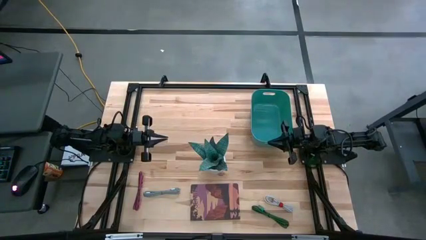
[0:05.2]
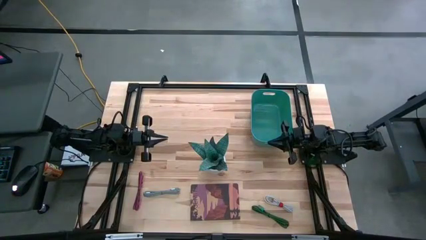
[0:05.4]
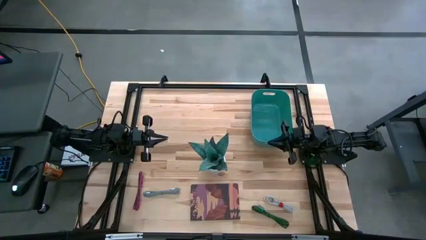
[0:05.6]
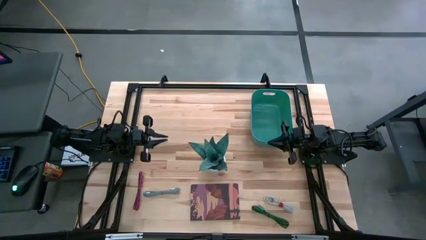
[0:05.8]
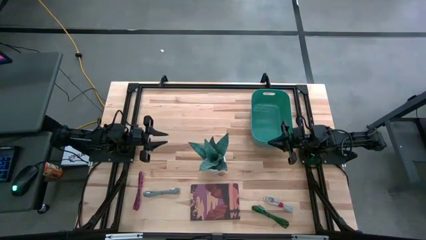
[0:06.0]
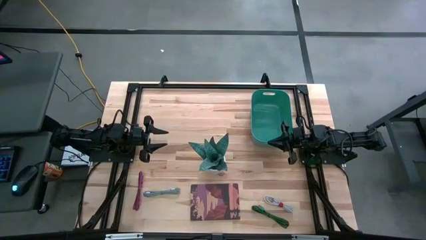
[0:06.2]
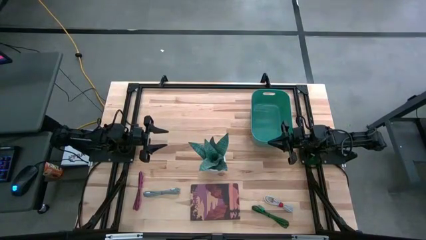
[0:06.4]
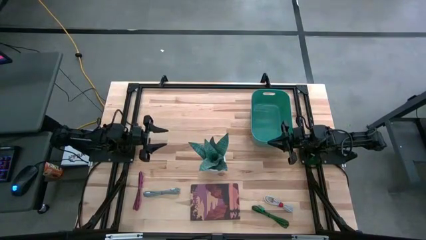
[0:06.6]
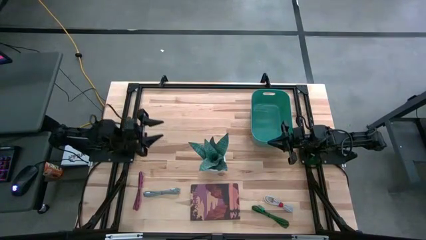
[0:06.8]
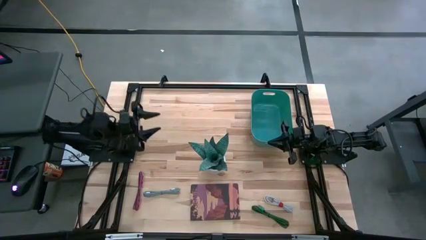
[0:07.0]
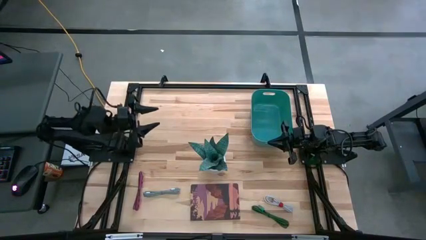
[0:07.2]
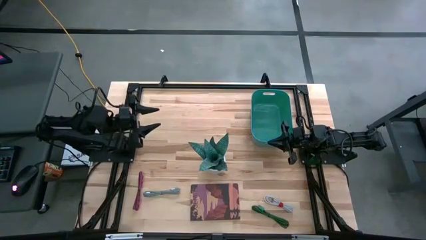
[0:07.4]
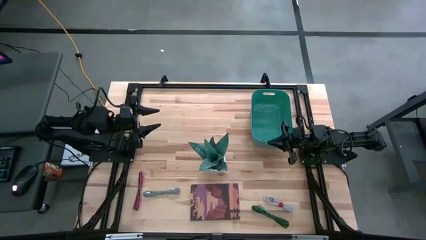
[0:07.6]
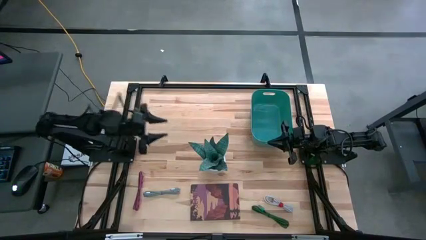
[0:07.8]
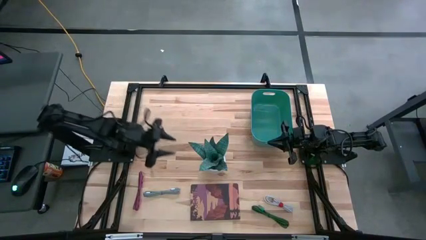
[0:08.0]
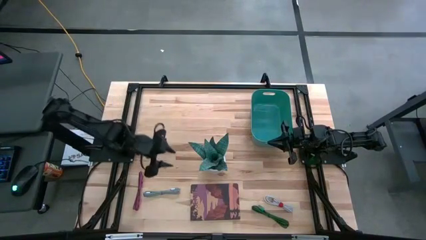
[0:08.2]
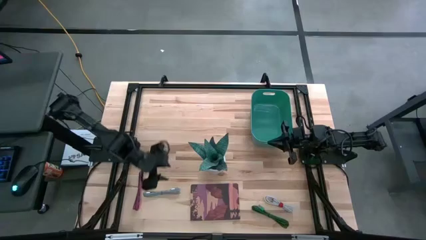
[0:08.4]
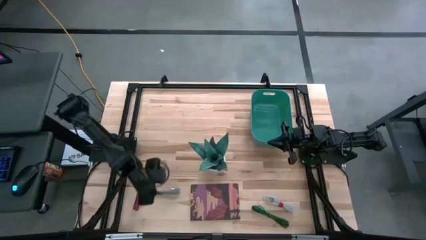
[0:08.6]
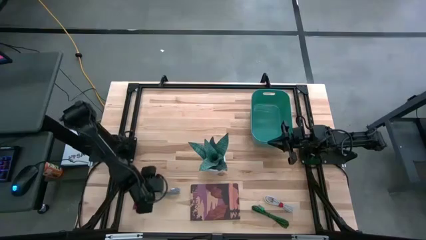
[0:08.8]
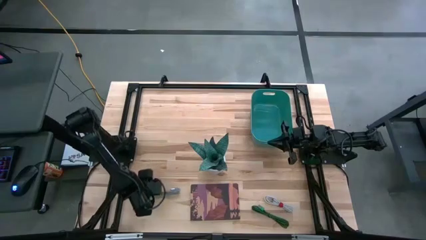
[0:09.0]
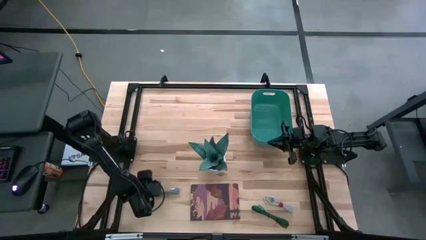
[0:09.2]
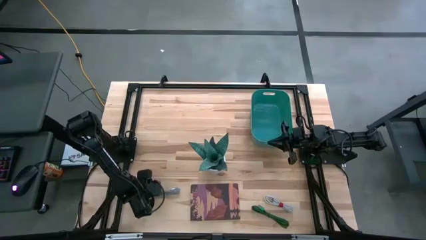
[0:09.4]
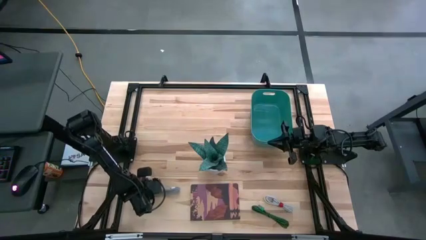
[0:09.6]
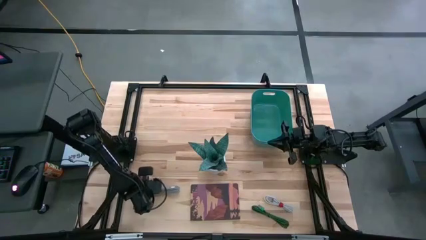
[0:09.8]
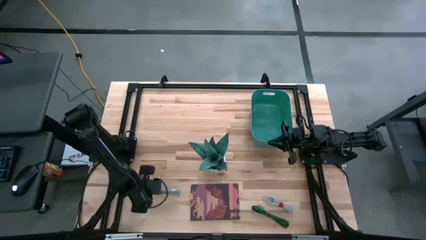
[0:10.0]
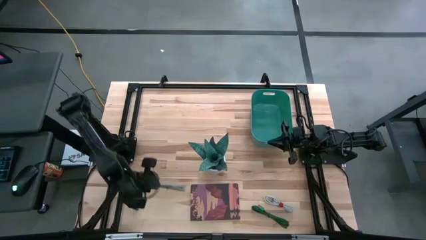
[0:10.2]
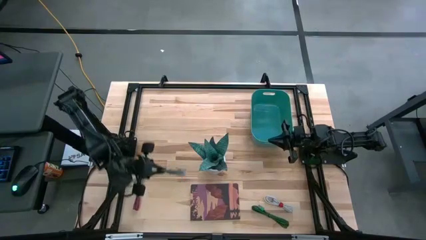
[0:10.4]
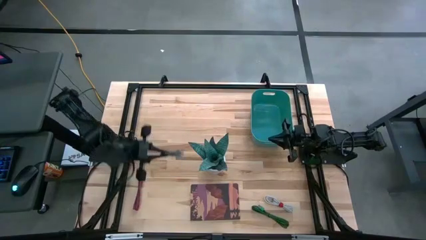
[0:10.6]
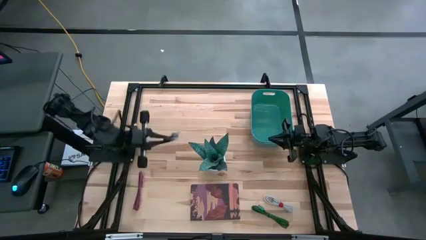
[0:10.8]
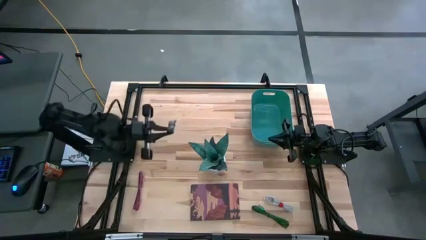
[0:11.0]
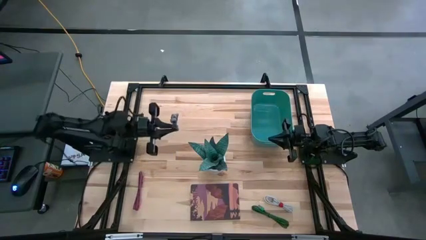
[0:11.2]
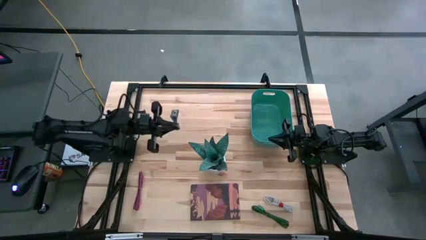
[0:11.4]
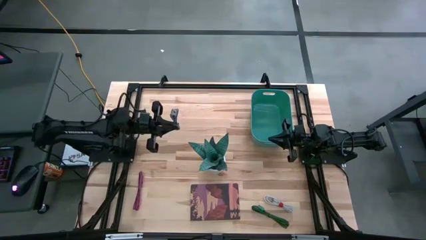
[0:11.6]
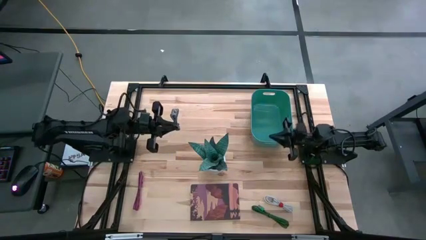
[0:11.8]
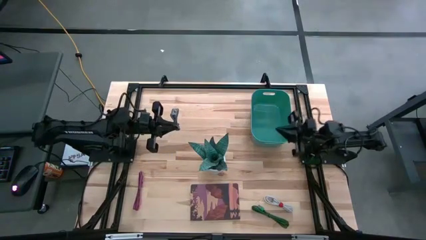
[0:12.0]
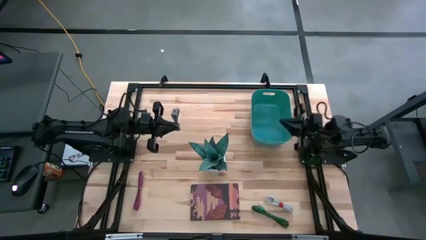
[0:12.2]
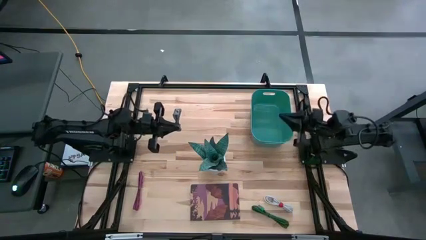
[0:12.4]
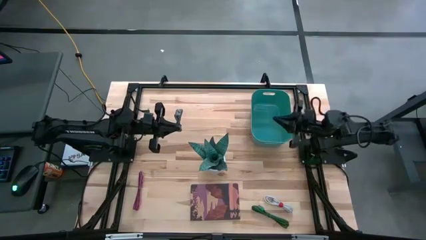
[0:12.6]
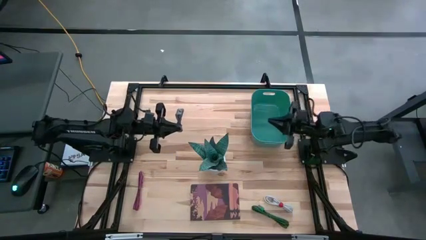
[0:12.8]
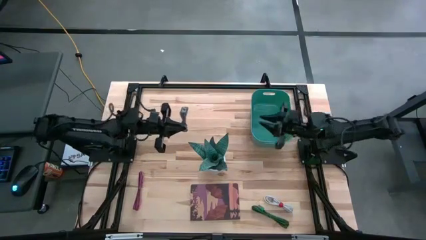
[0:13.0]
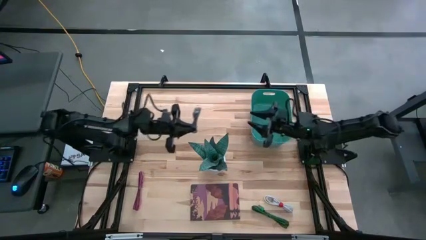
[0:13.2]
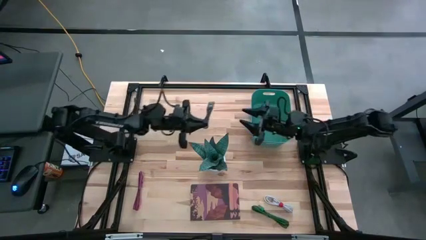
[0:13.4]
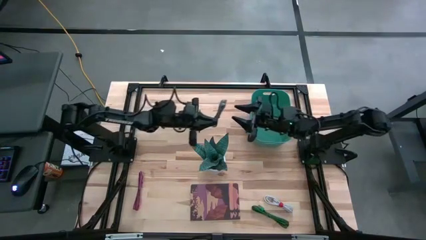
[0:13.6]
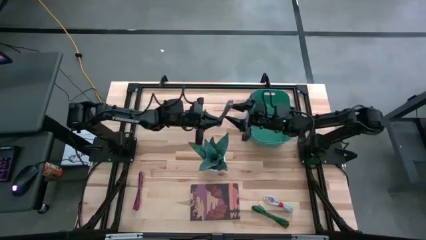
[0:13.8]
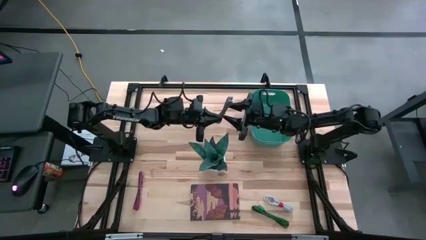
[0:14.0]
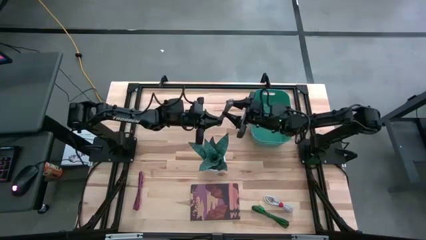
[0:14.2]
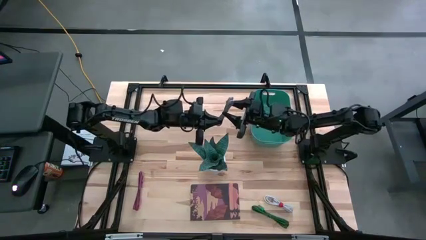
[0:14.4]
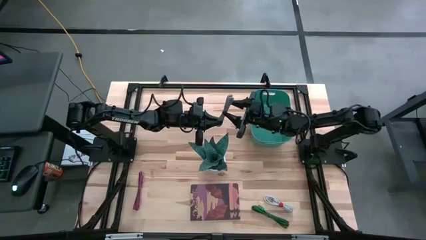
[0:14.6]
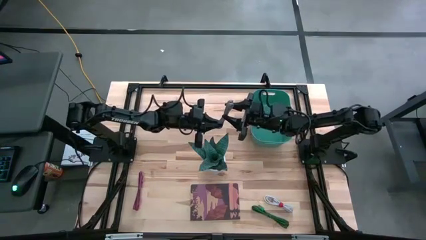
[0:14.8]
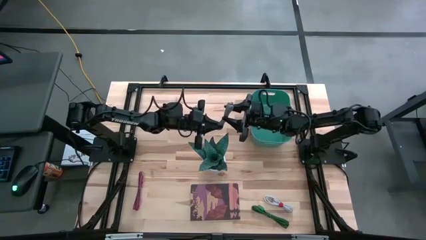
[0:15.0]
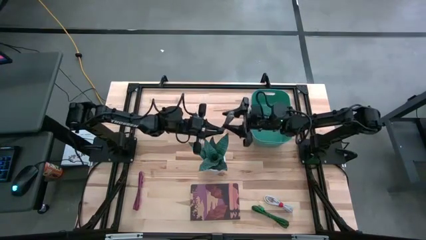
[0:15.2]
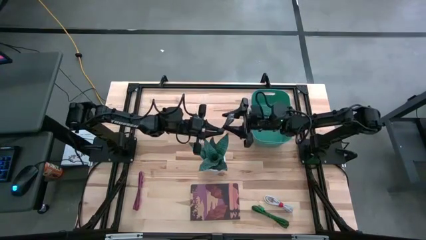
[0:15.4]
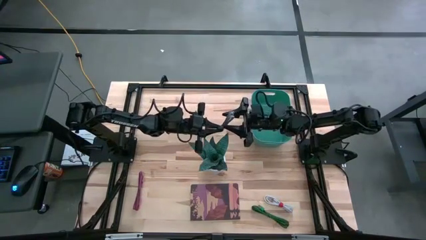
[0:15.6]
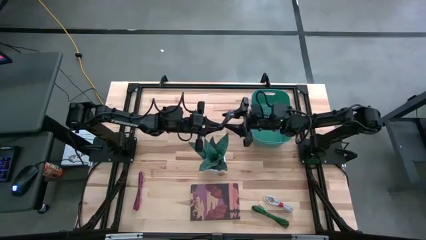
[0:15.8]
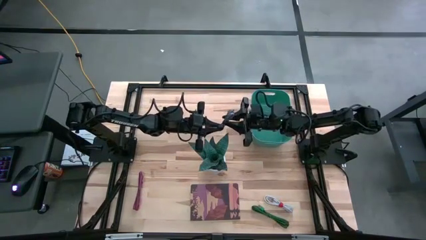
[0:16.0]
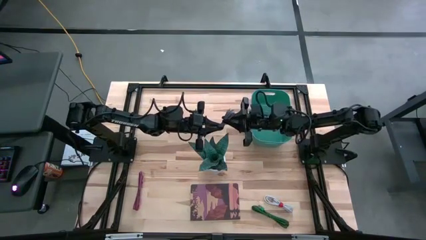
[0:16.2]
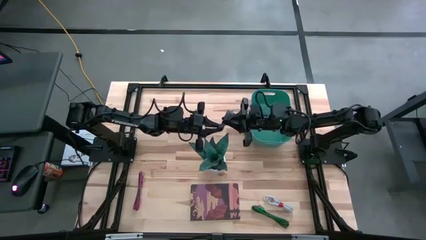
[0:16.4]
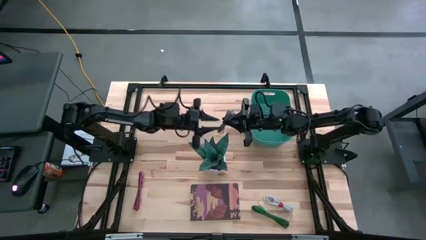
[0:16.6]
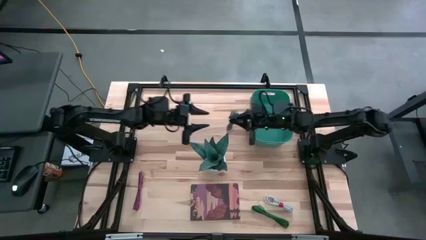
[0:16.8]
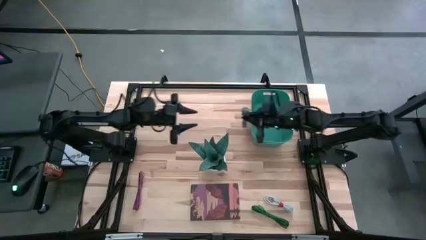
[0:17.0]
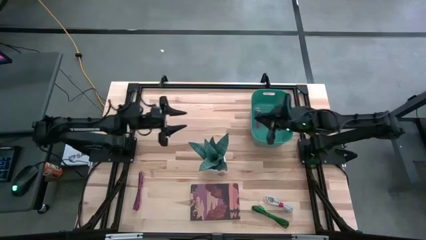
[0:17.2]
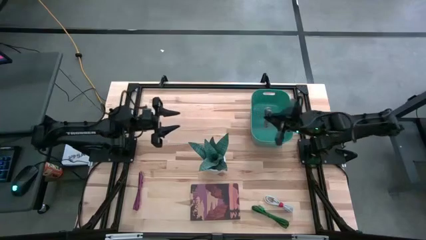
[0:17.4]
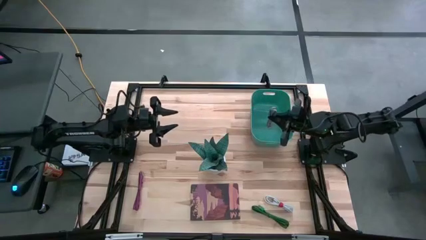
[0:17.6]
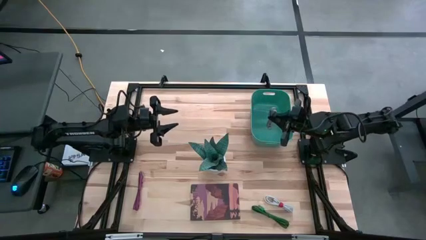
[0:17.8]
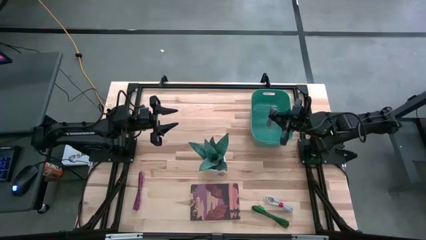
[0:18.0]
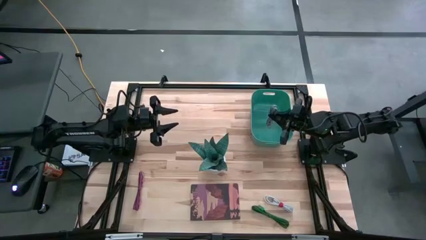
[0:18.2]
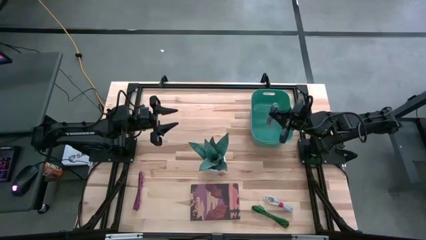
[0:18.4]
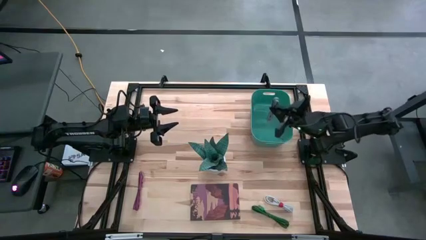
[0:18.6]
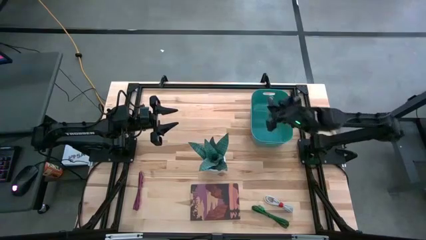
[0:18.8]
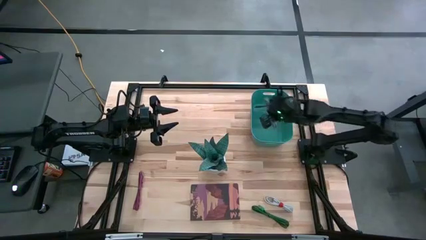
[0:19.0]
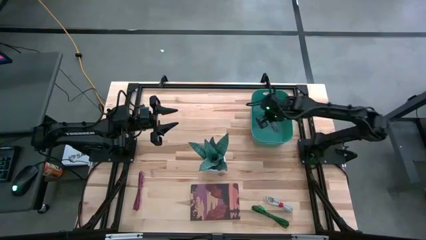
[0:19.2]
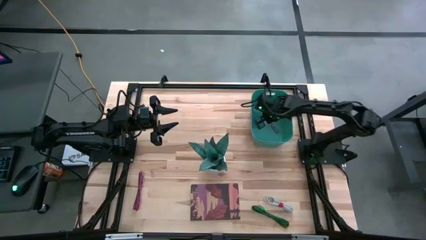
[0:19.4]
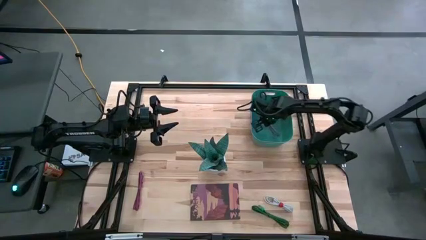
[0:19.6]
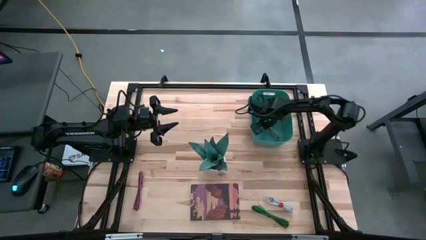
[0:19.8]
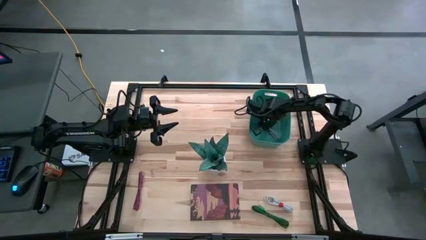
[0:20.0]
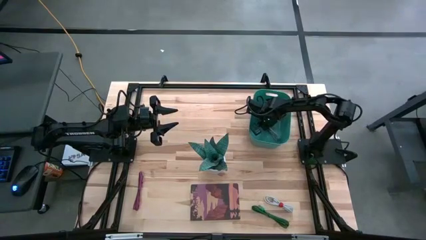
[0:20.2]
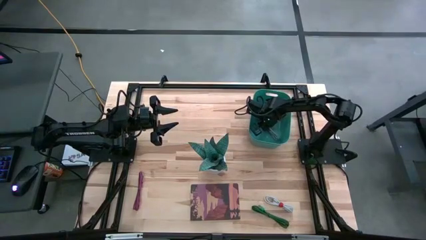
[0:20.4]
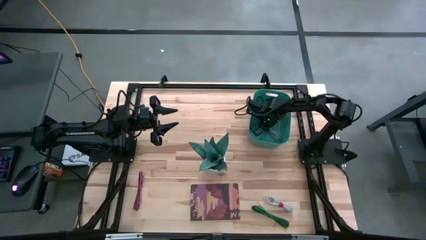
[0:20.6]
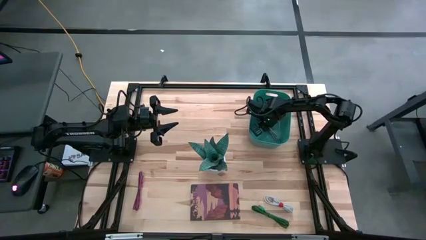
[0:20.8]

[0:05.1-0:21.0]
Task: Pick and place USB-C Cables
Put the white patterned charger cable into the green container
